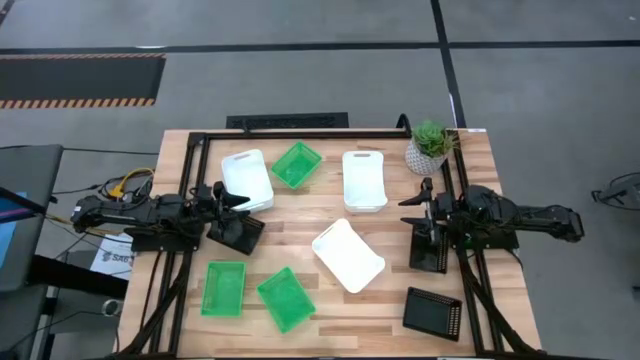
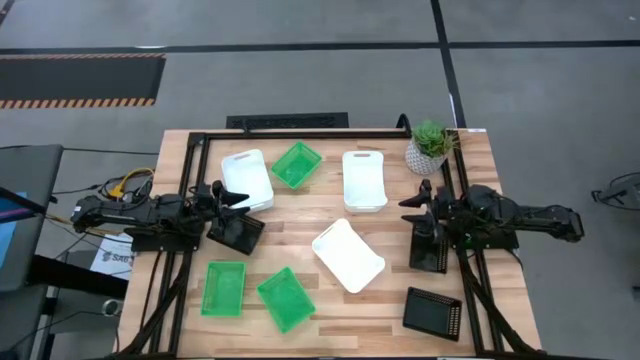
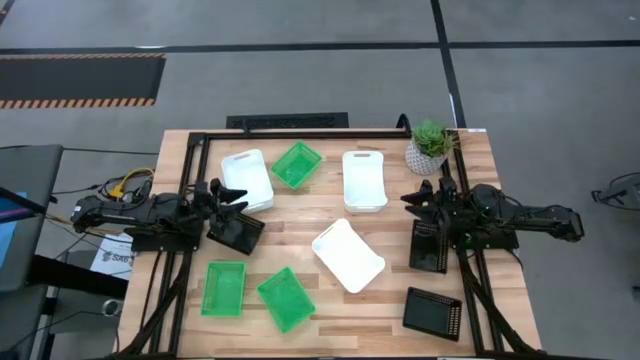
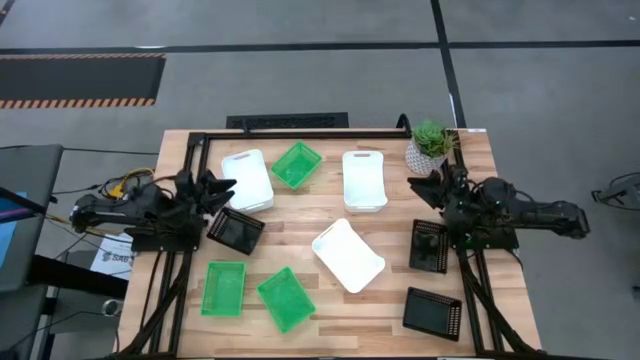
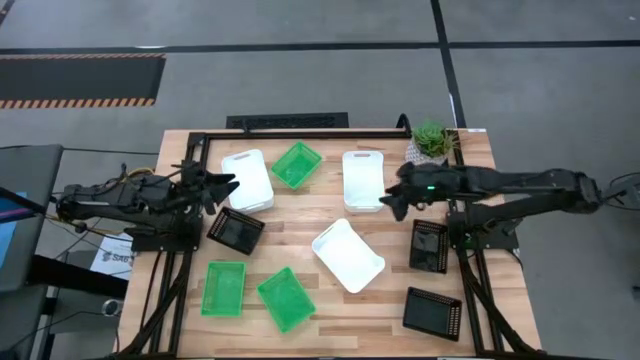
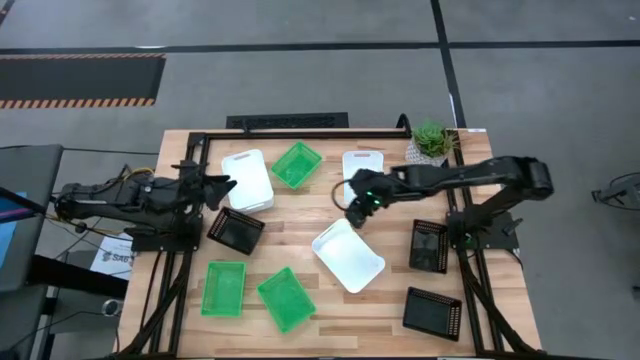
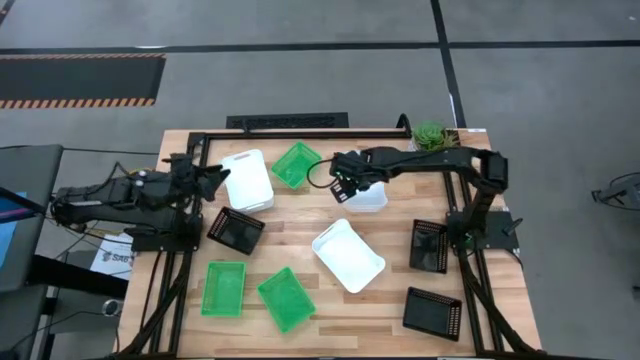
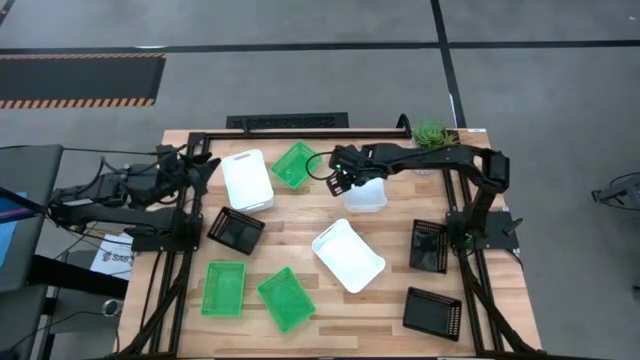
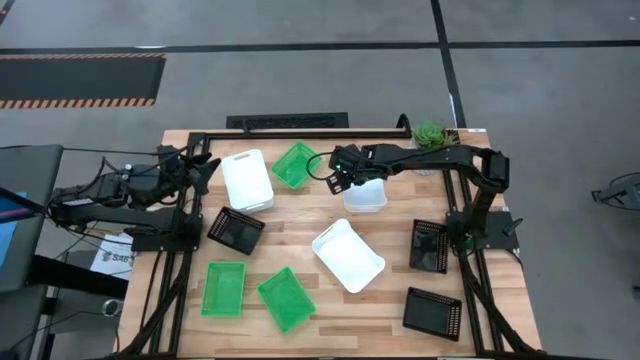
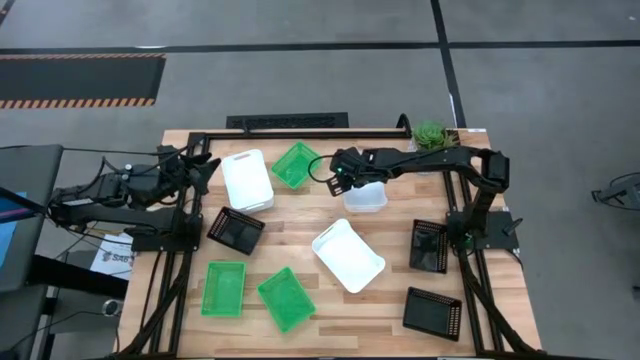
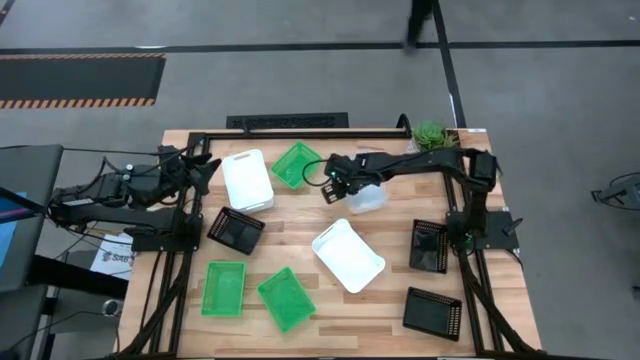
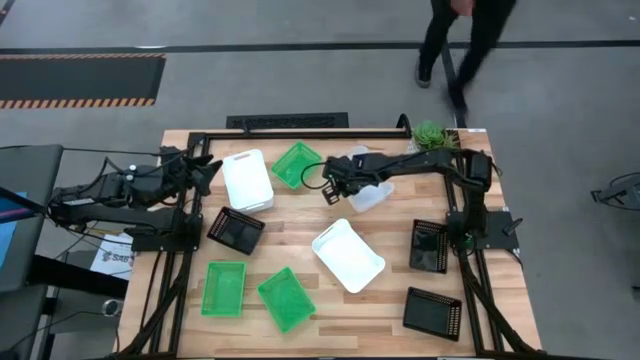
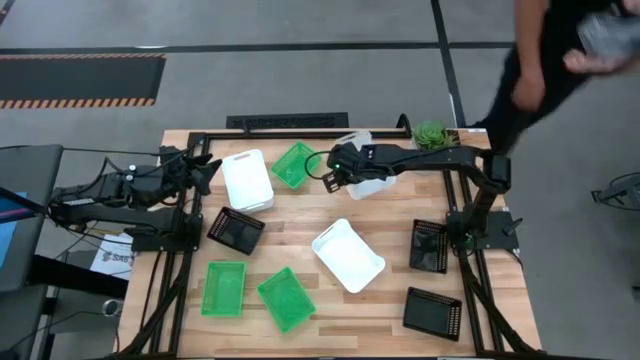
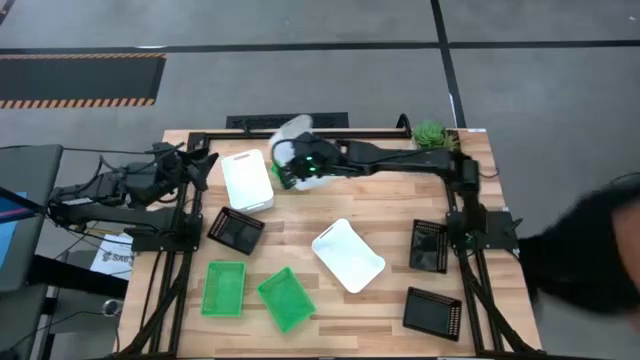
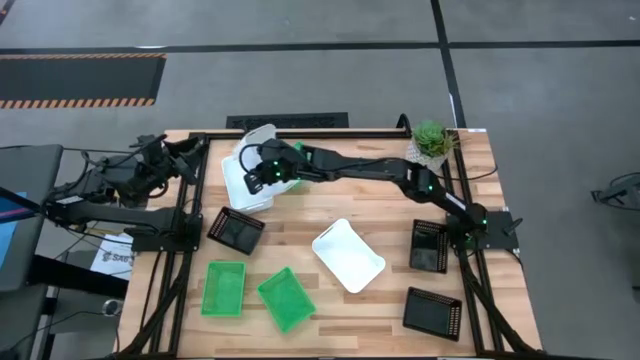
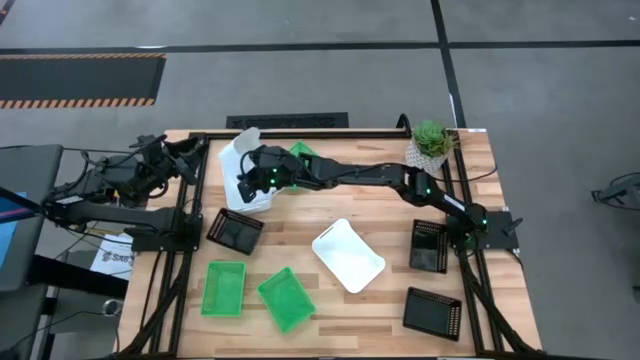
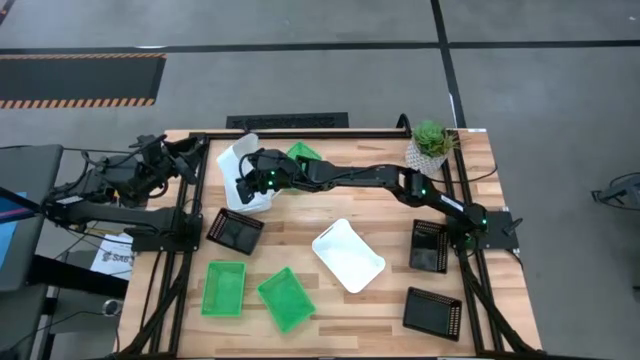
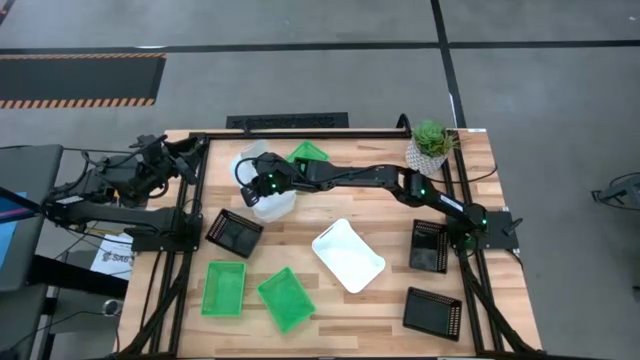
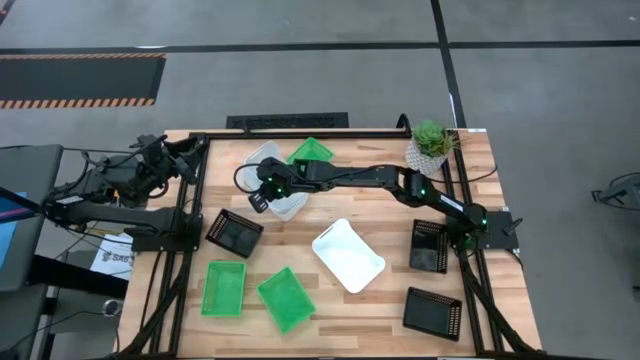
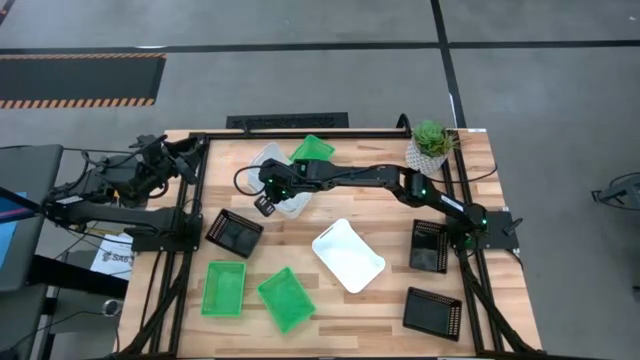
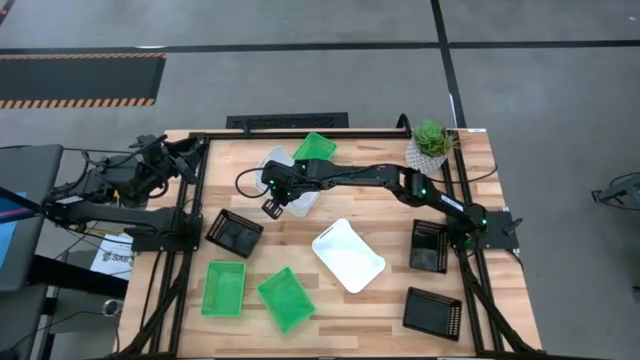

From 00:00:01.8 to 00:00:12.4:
Stack the top right white bin on top of the top white bin

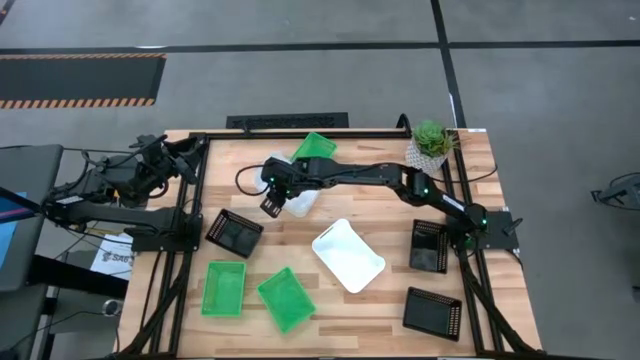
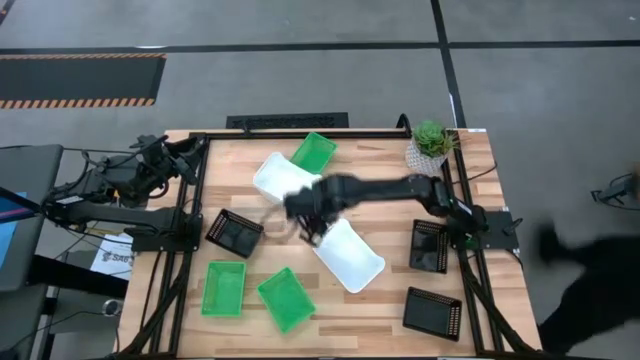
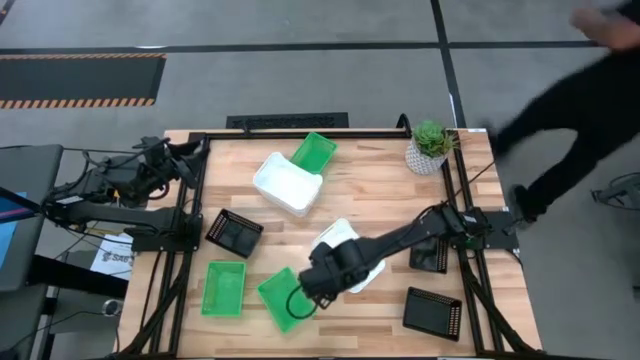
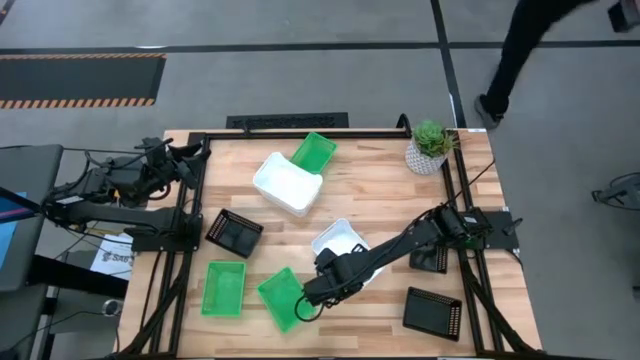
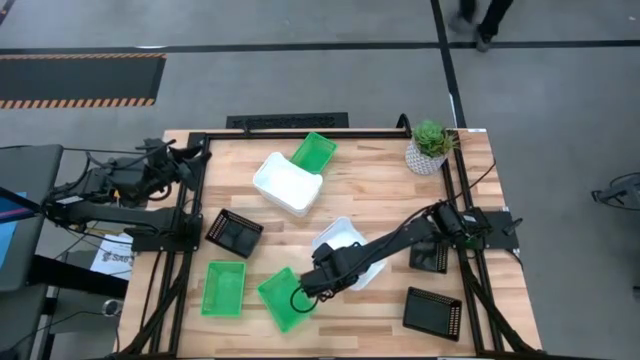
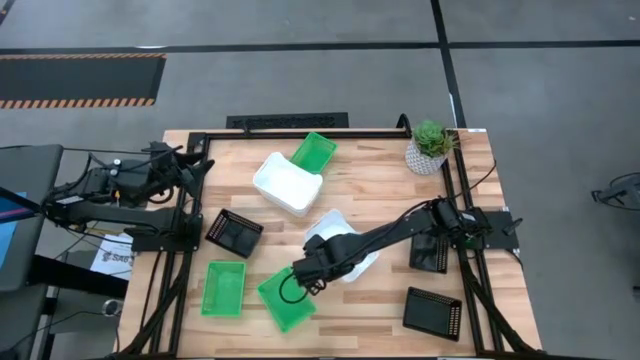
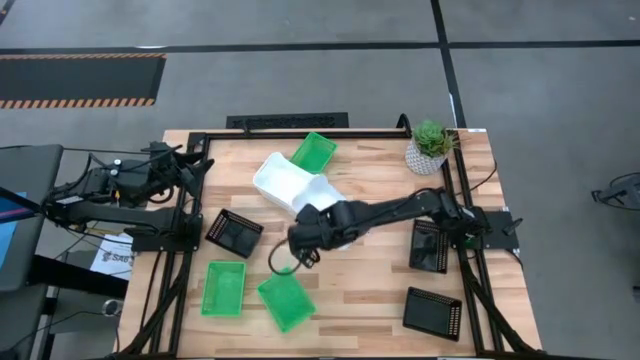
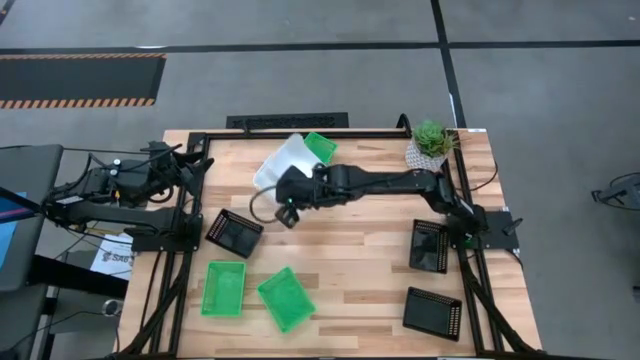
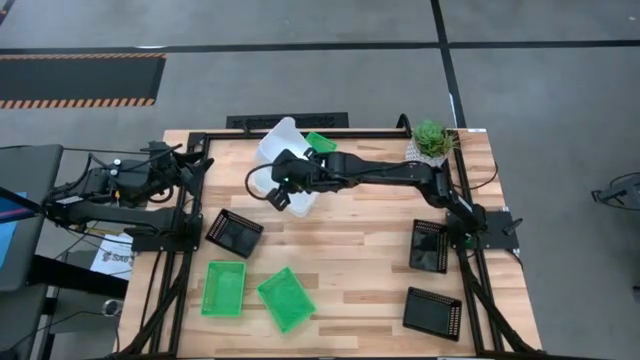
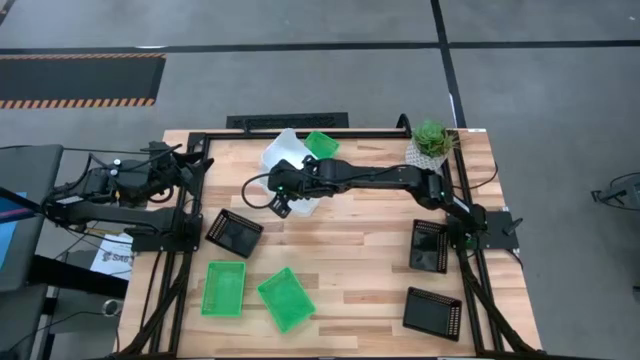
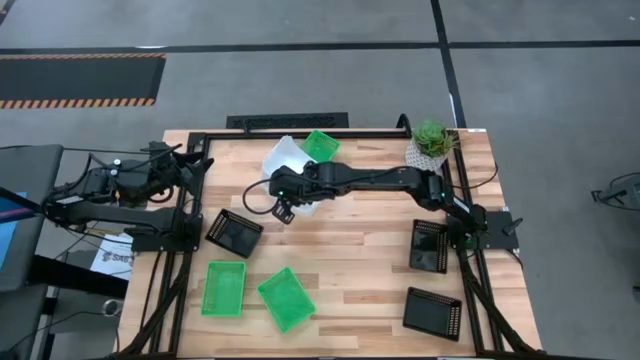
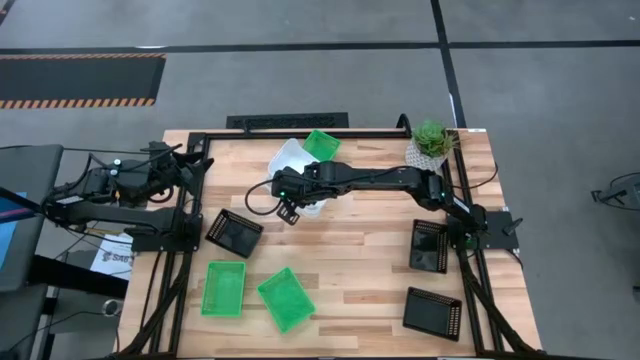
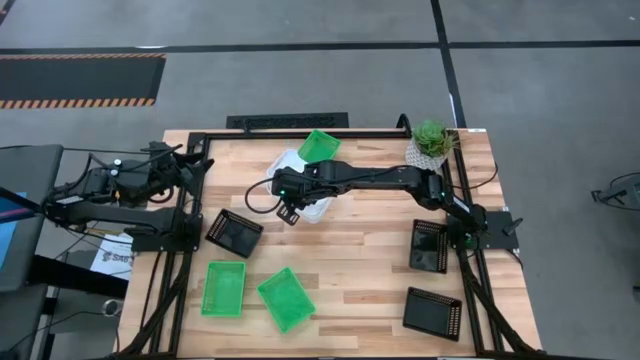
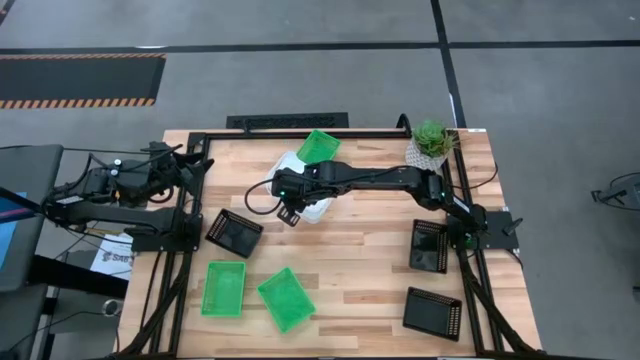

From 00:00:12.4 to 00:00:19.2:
Stack the bottom white bin on top of the top white bins

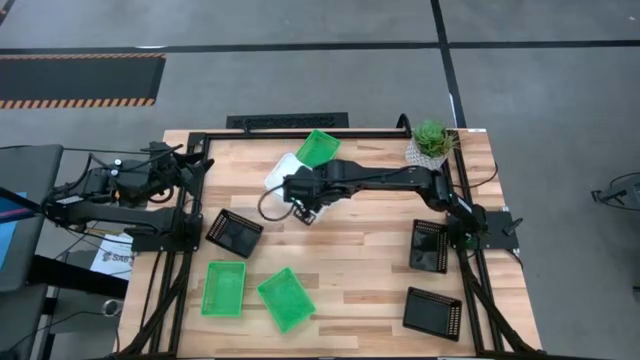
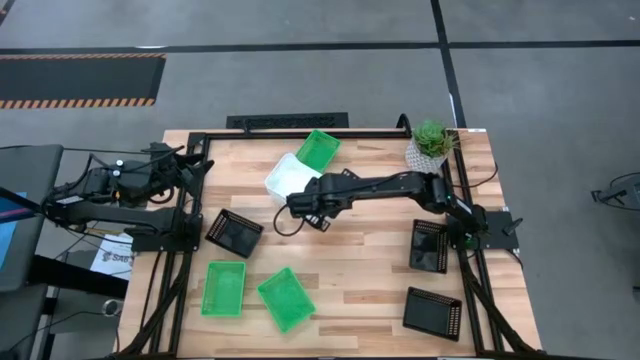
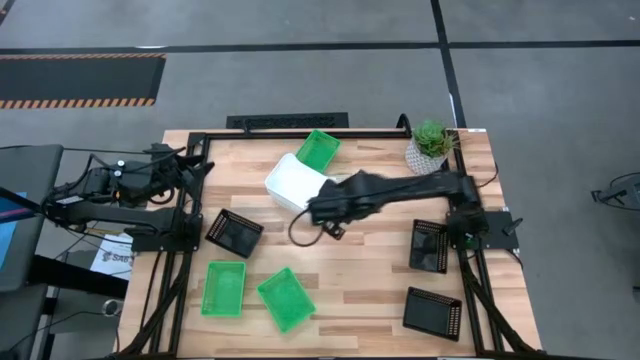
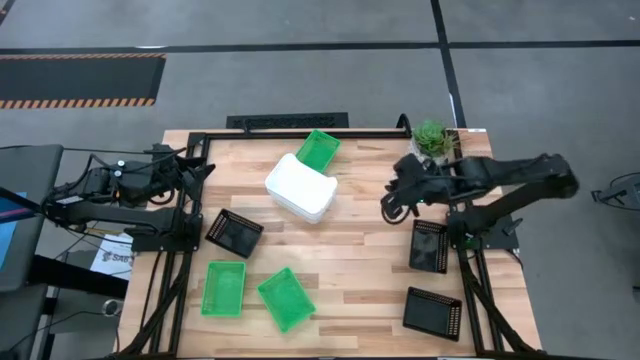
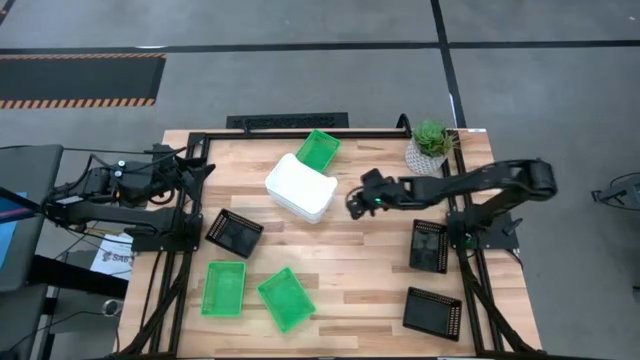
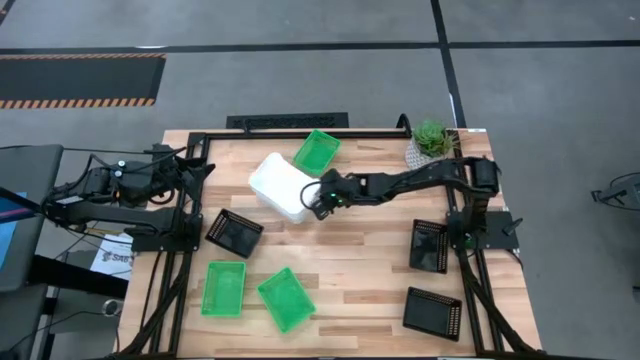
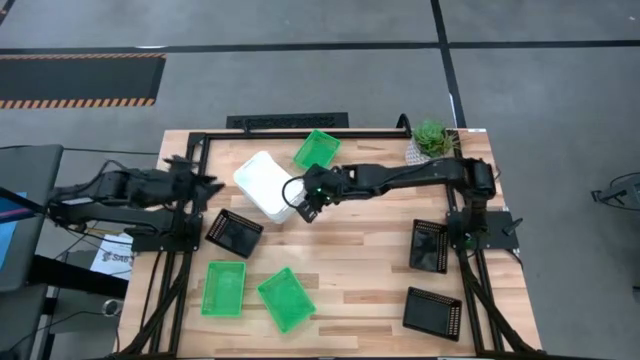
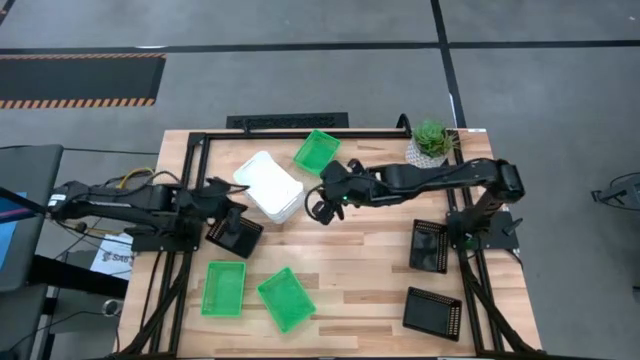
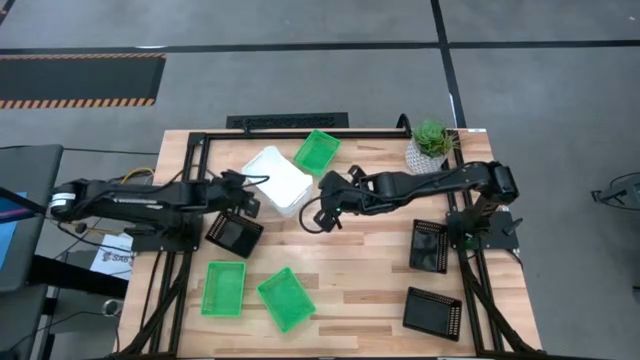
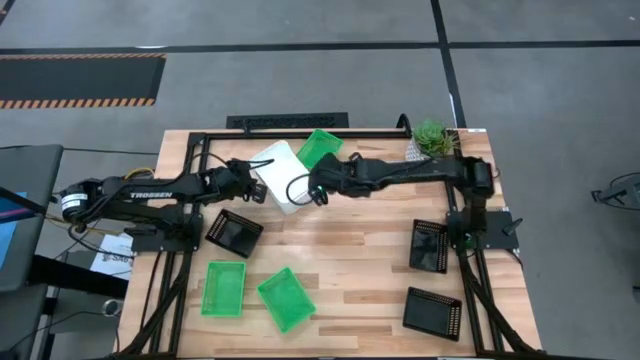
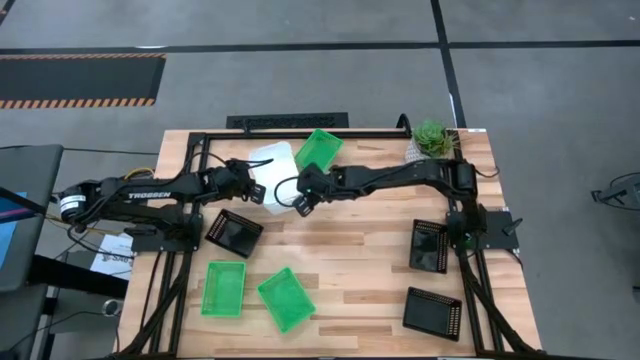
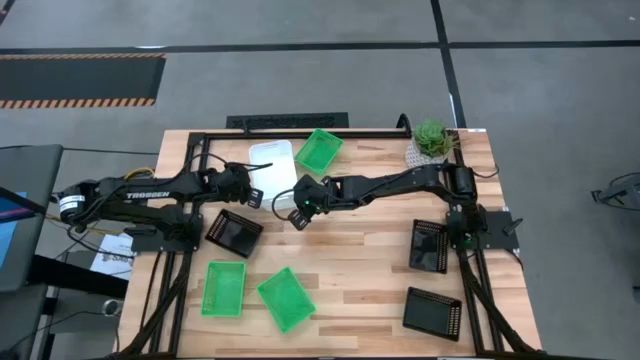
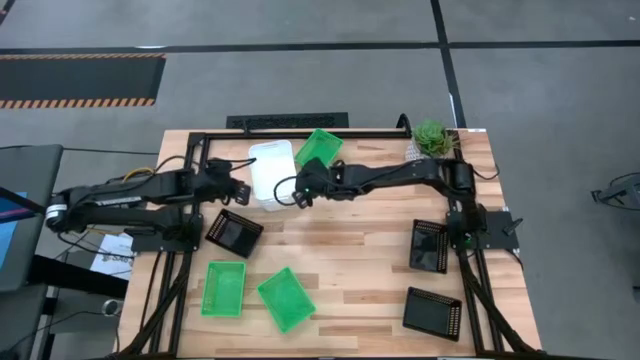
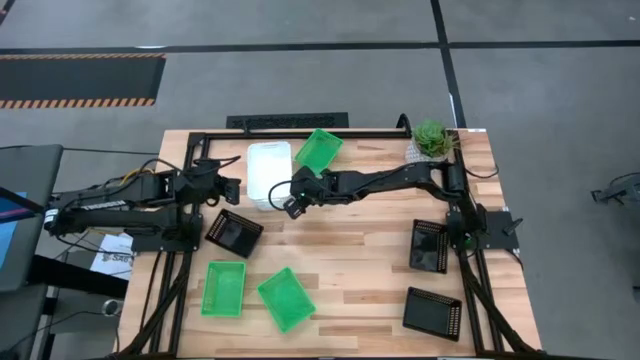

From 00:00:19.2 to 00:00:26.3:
Adjust the stacked white bins
